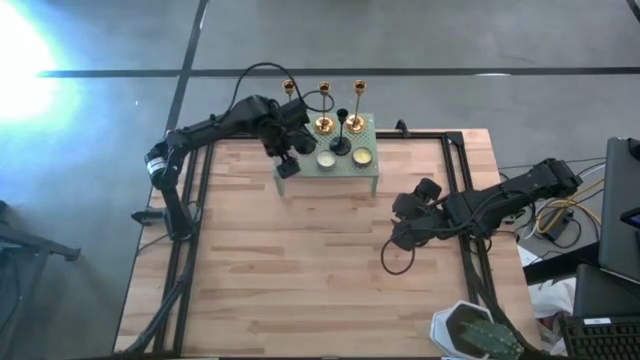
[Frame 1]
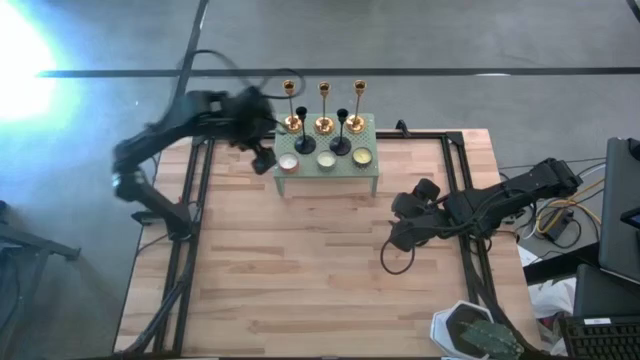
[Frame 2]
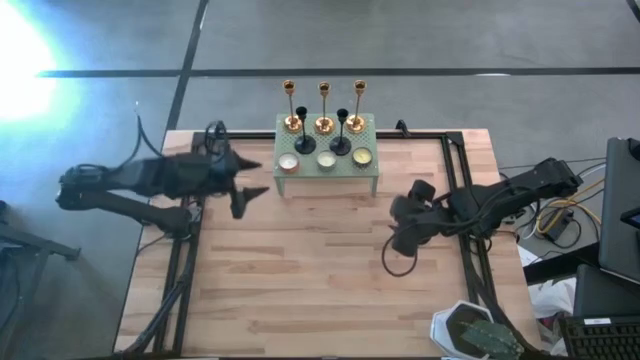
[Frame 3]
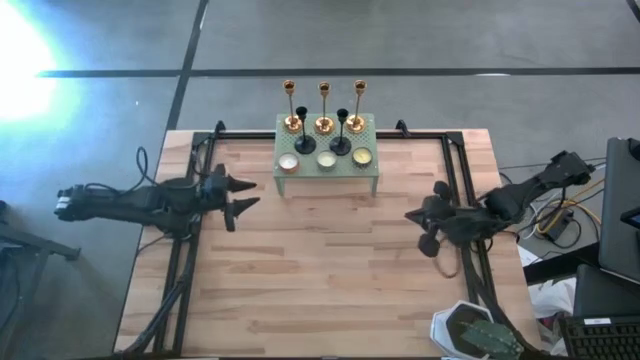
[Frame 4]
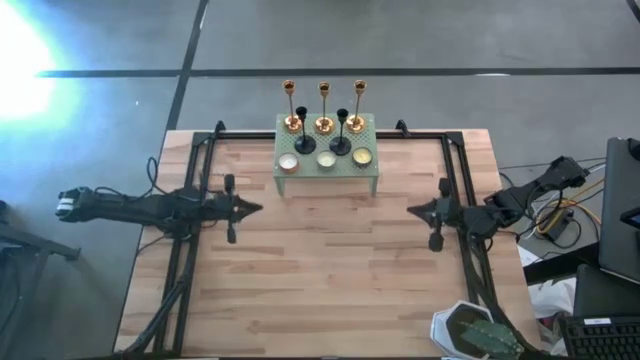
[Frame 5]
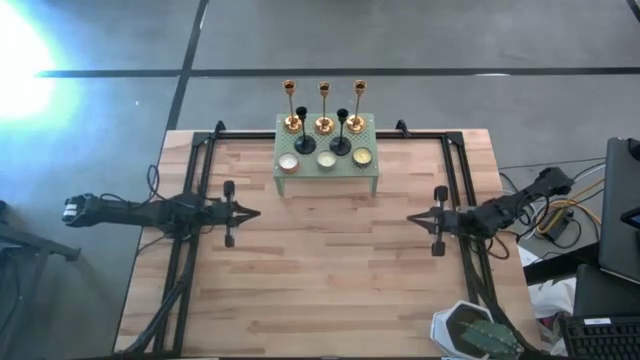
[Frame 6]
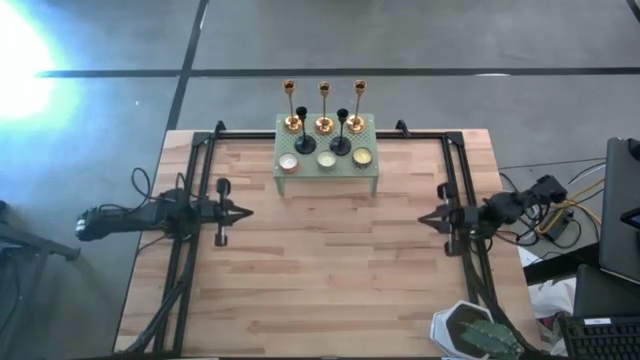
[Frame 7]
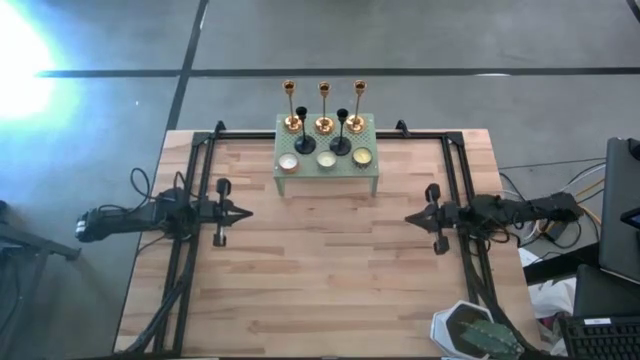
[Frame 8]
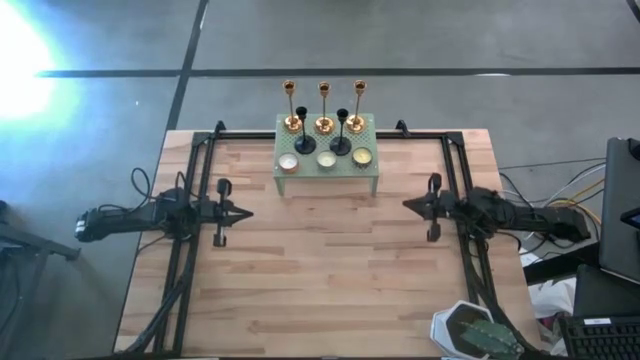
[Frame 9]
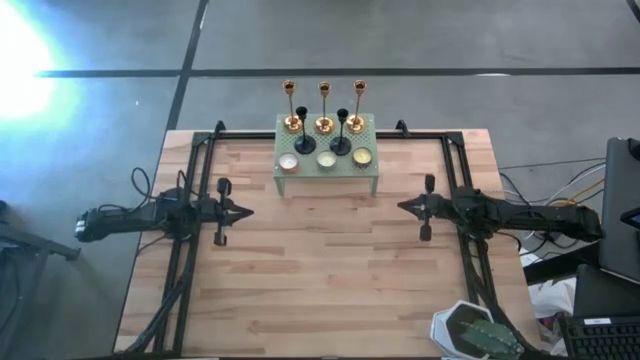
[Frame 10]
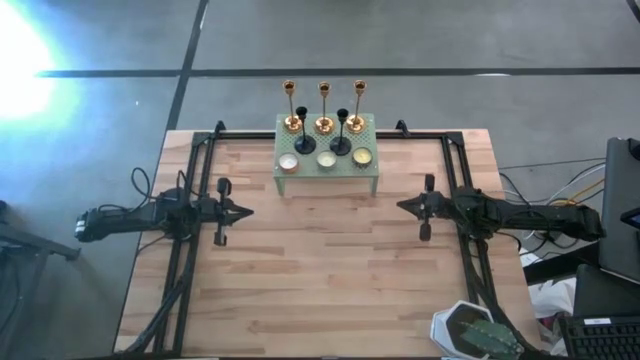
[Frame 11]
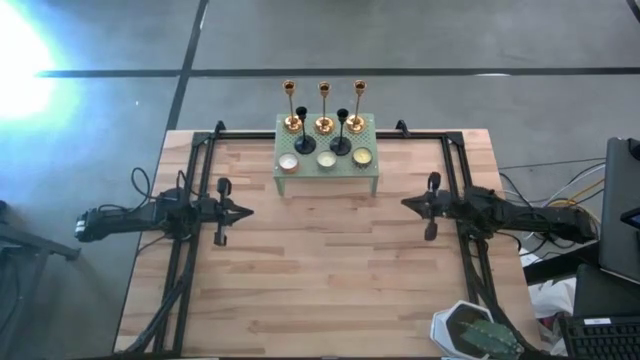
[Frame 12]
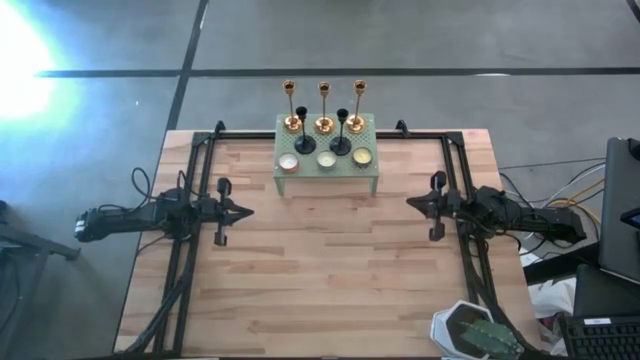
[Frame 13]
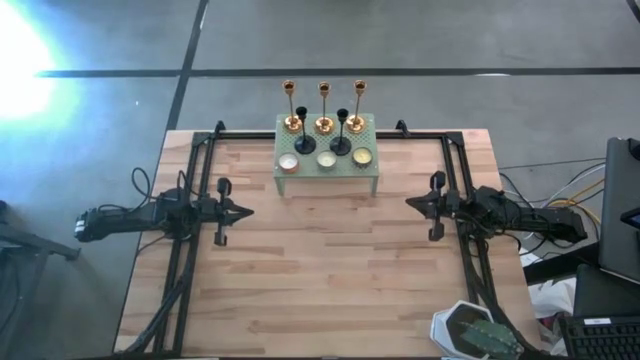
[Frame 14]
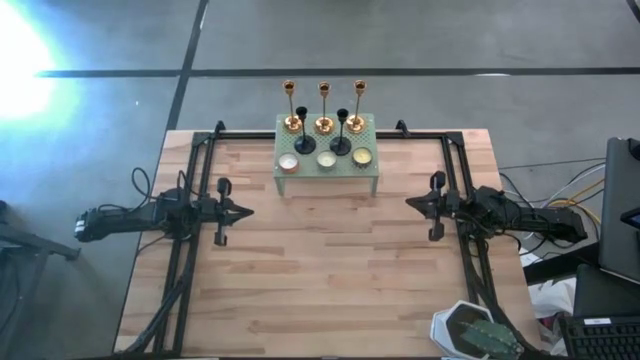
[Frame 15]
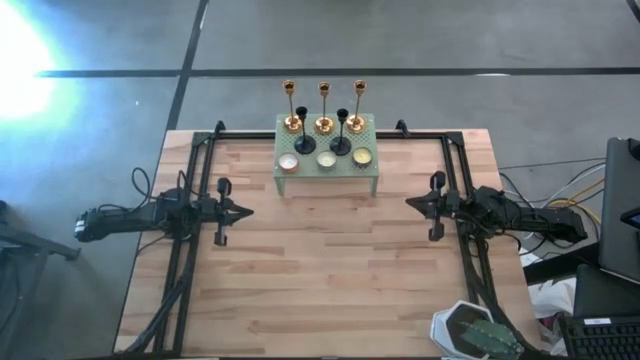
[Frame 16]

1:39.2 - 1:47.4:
Task: Pick & Place candle stick holders
Return to Home Position

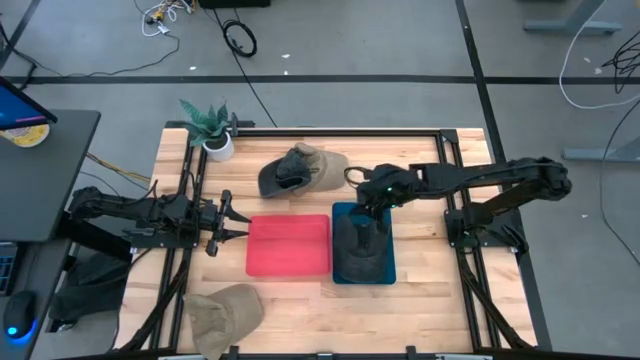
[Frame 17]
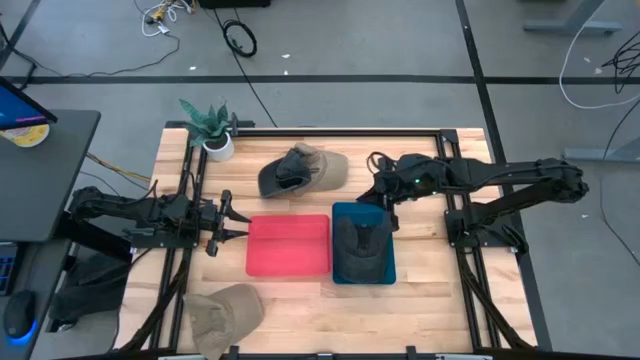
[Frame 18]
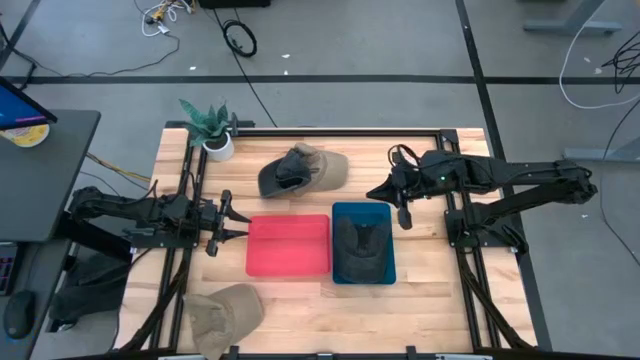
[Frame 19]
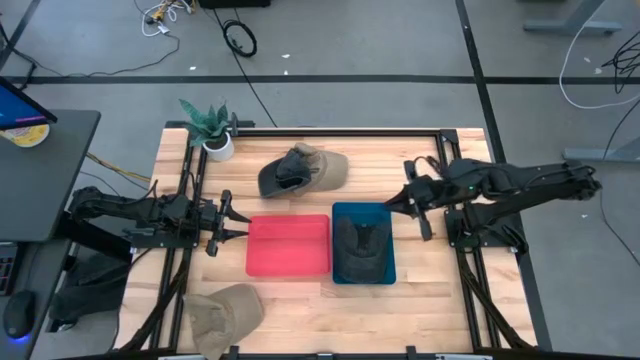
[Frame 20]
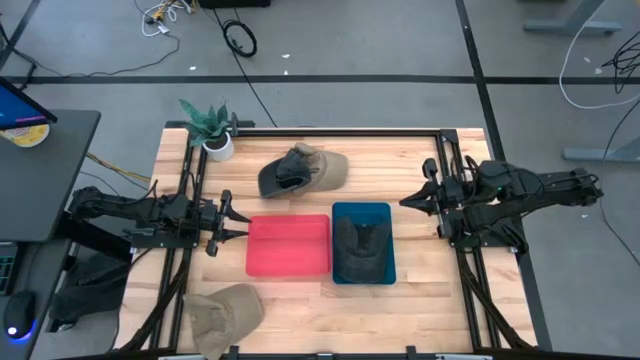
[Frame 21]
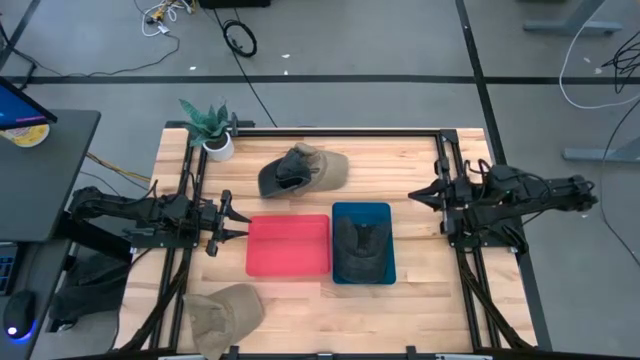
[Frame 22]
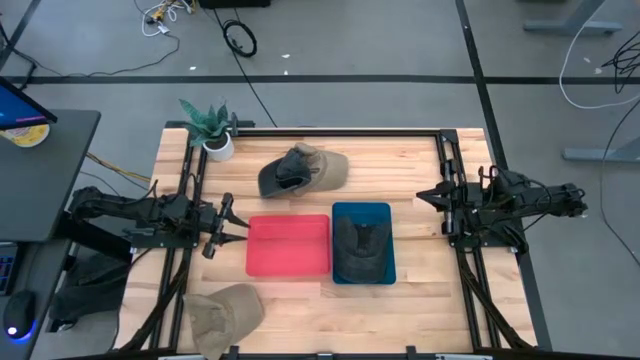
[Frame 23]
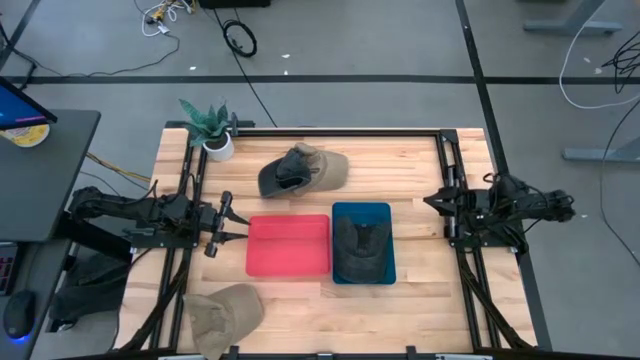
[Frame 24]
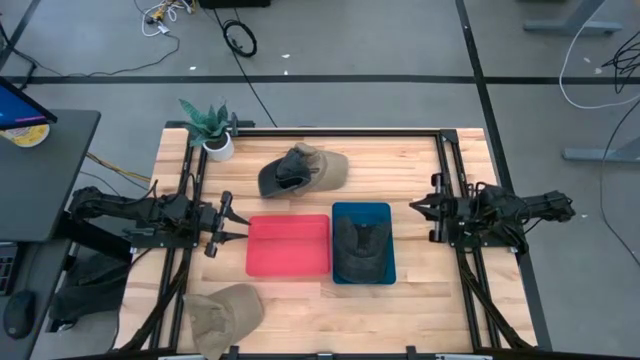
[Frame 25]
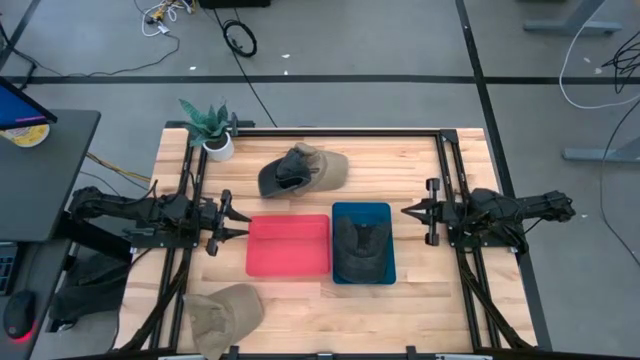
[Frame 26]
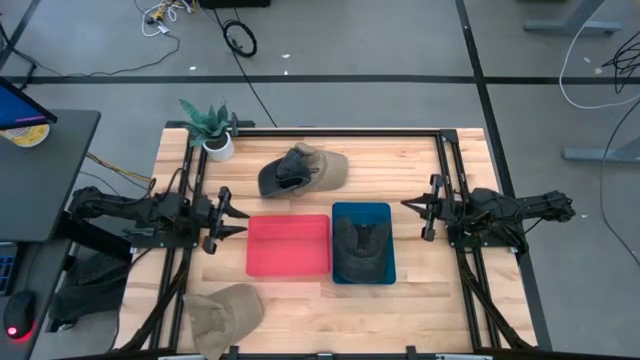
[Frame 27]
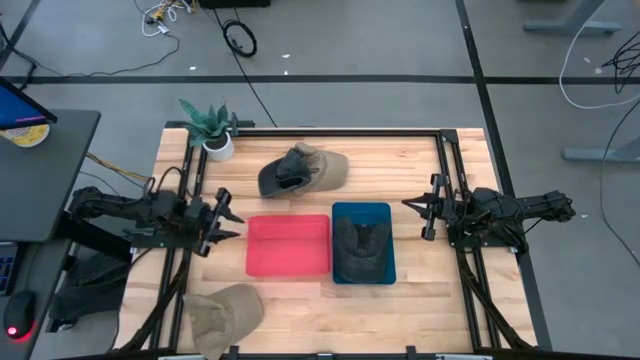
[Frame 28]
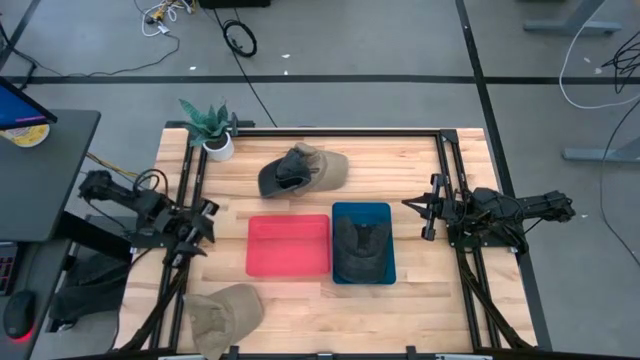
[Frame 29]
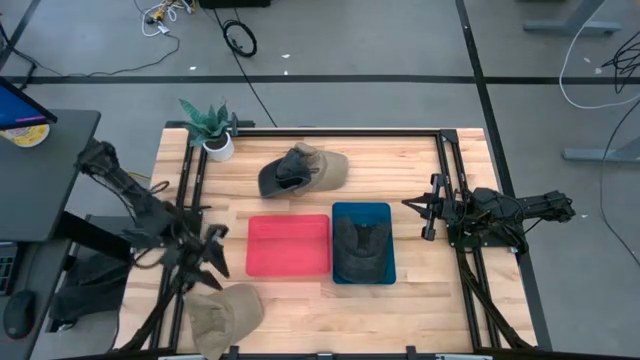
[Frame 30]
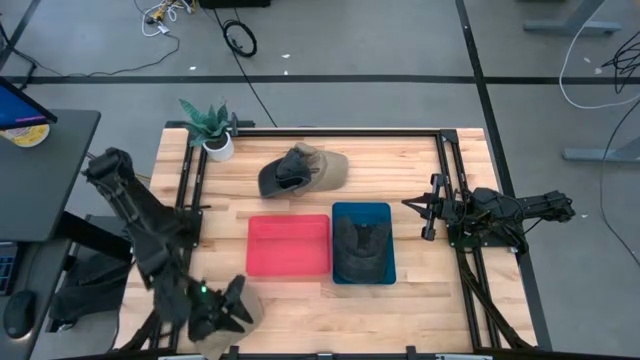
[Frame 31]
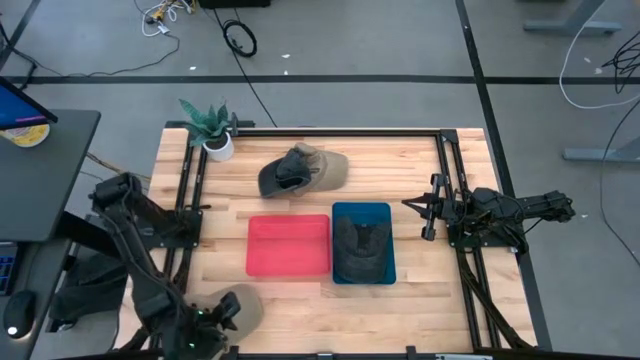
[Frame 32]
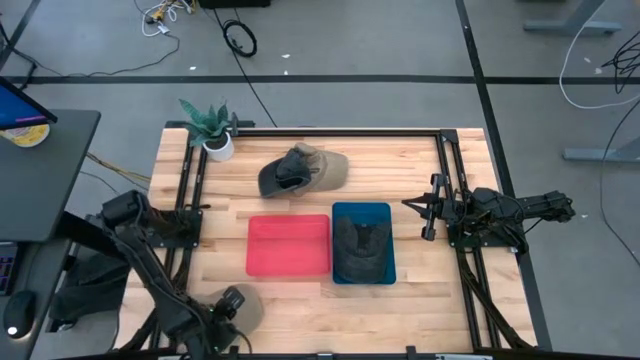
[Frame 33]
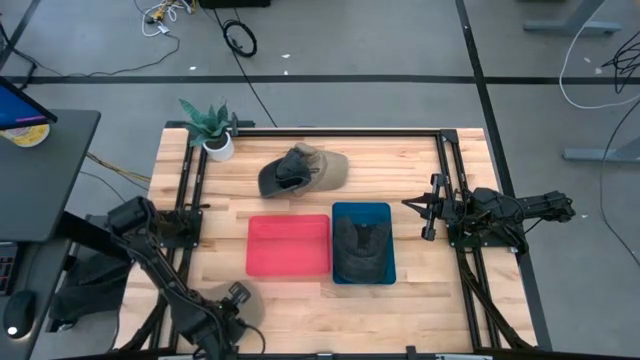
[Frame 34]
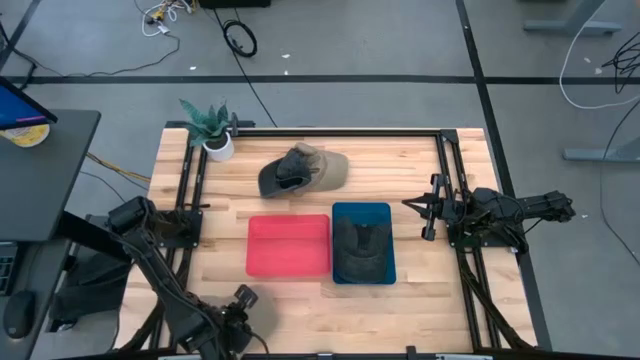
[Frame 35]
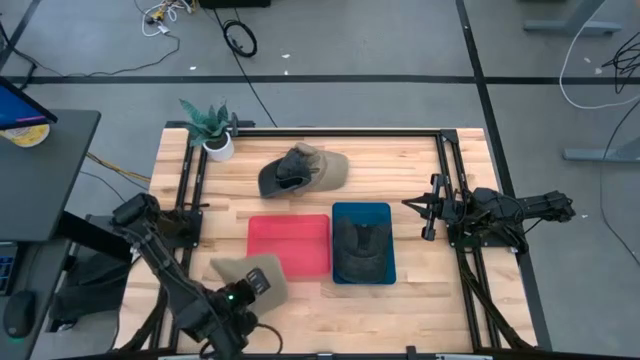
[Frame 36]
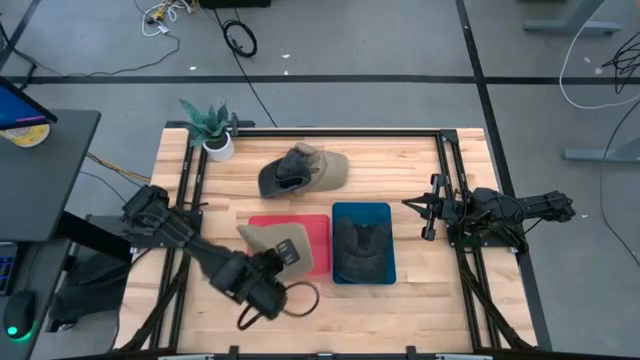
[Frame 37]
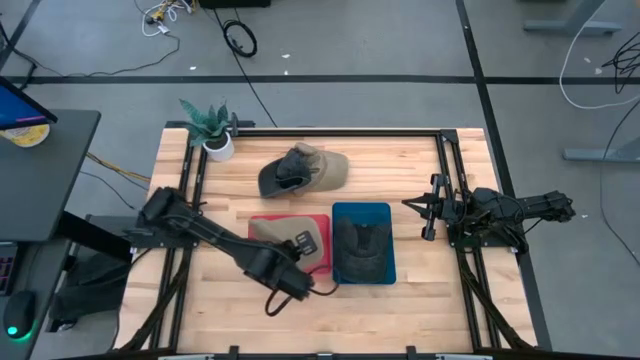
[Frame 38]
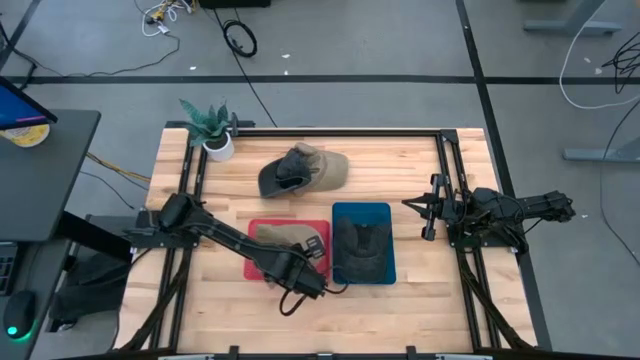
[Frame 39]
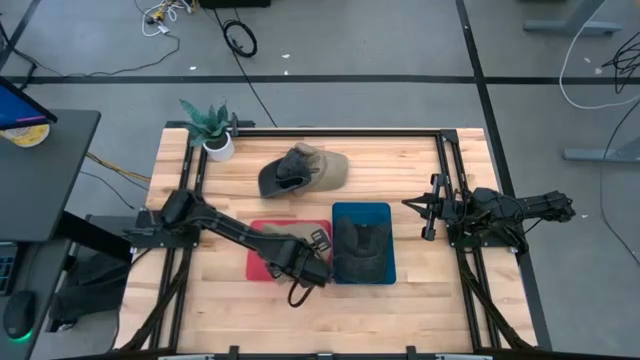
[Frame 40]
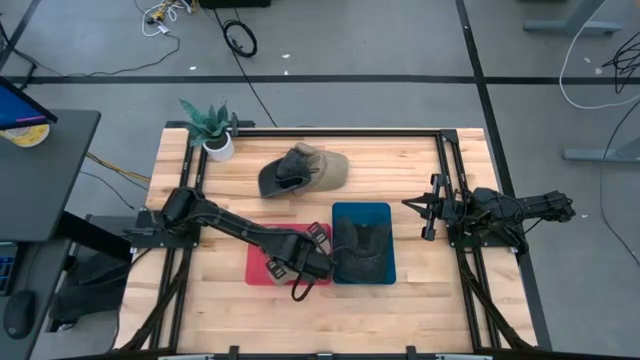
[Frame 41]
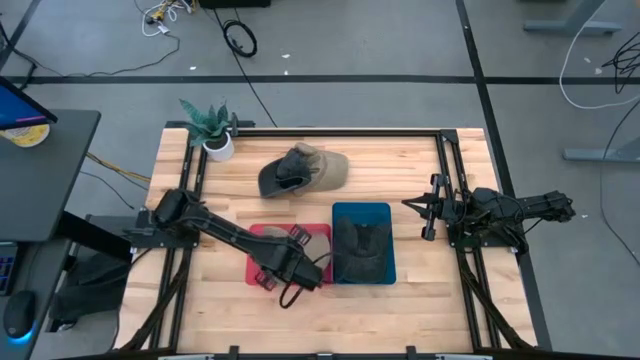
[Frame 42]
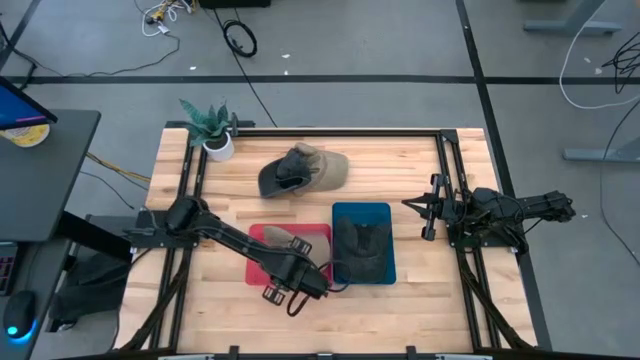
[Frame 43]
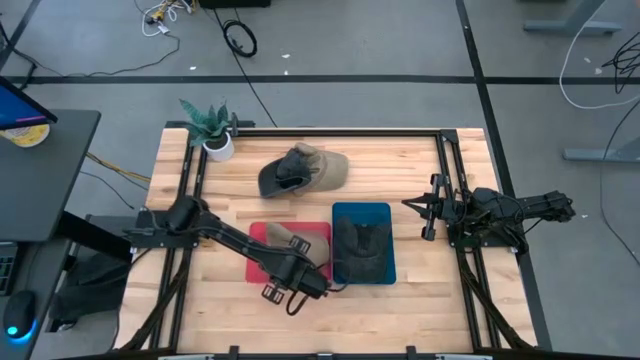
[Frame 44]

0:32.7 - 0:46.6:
Task: Pick & Place hat
Put the bottom brown cap into the red bin
